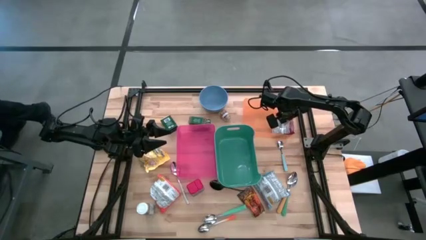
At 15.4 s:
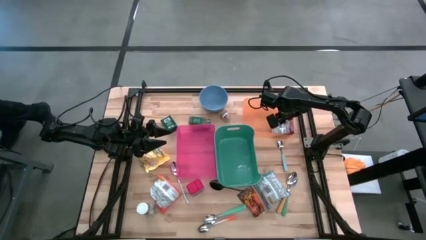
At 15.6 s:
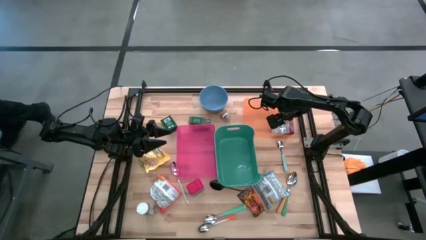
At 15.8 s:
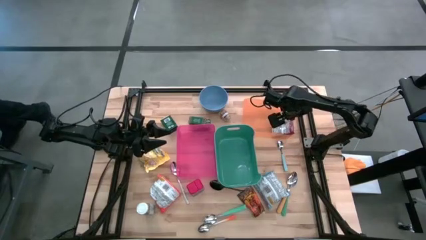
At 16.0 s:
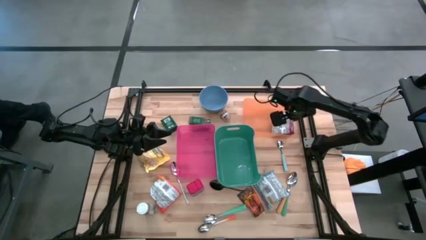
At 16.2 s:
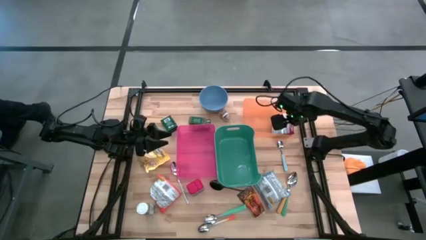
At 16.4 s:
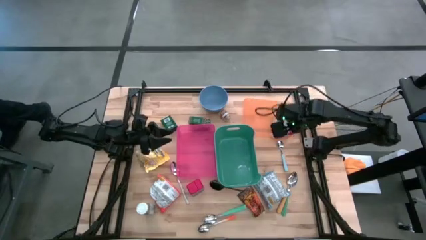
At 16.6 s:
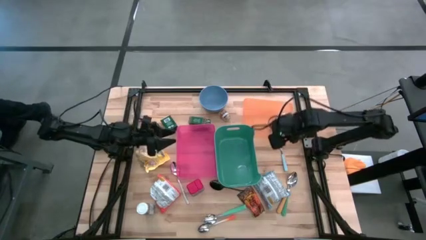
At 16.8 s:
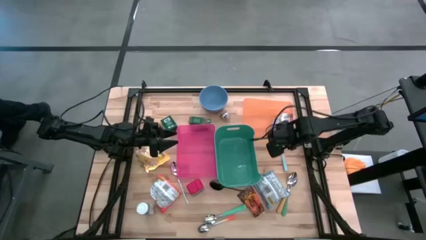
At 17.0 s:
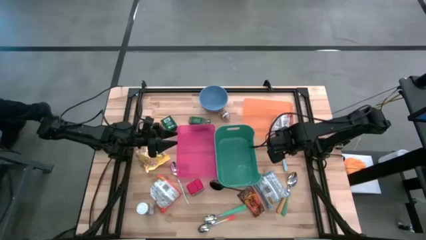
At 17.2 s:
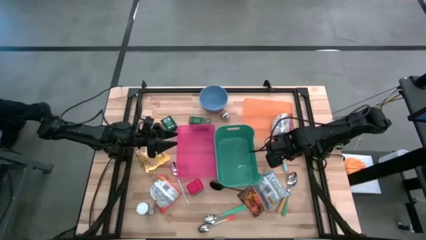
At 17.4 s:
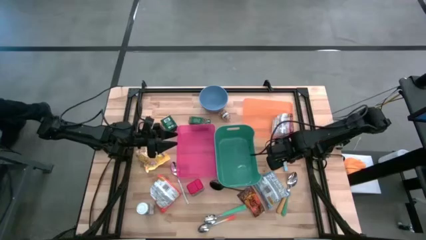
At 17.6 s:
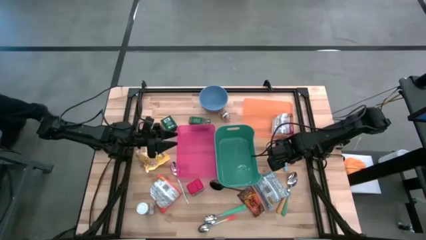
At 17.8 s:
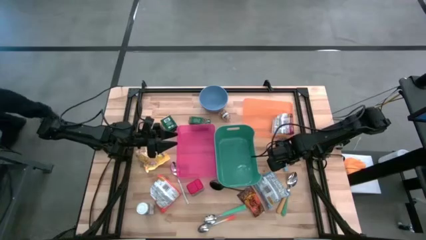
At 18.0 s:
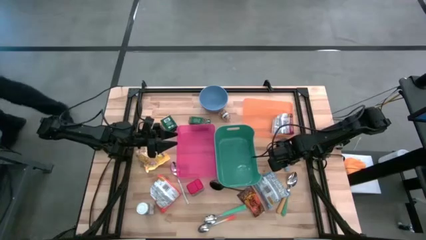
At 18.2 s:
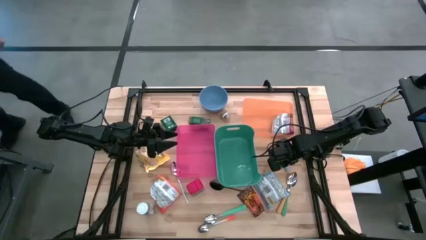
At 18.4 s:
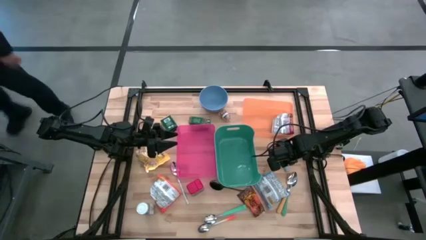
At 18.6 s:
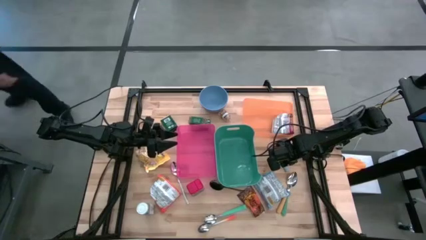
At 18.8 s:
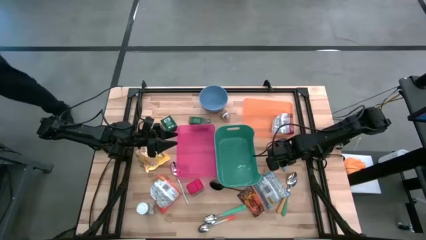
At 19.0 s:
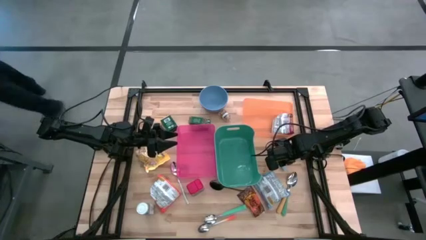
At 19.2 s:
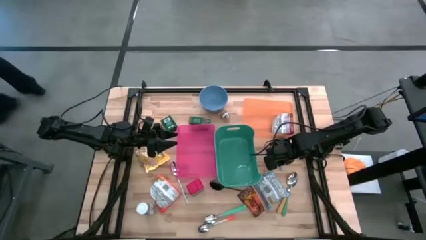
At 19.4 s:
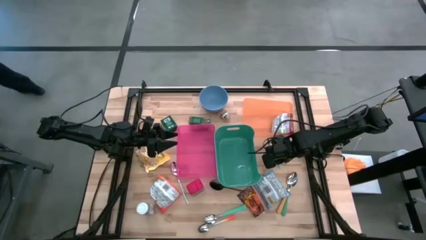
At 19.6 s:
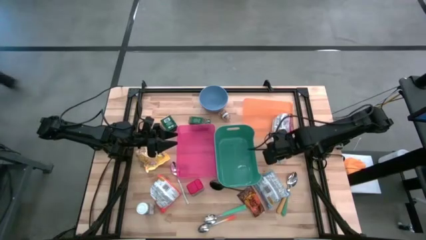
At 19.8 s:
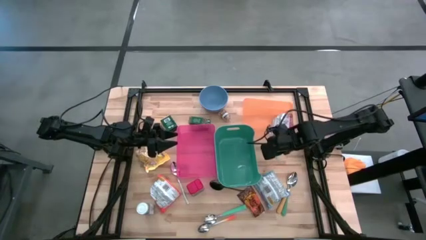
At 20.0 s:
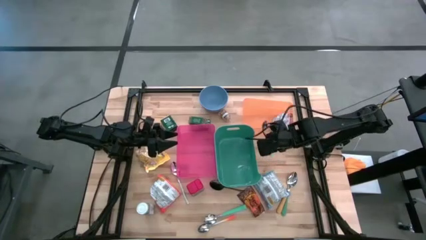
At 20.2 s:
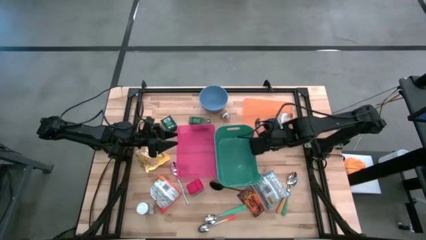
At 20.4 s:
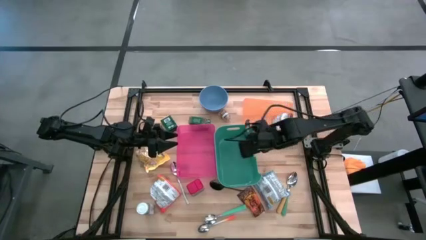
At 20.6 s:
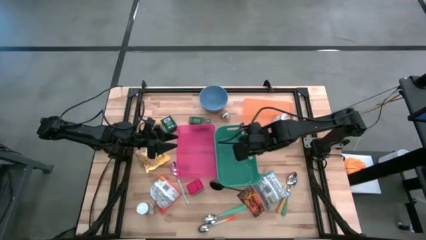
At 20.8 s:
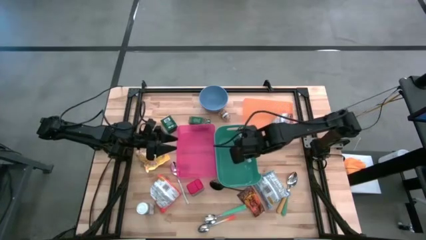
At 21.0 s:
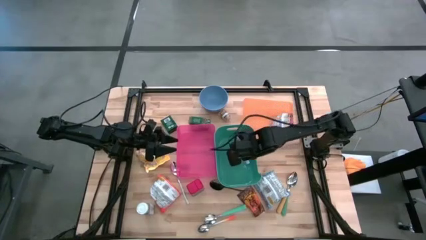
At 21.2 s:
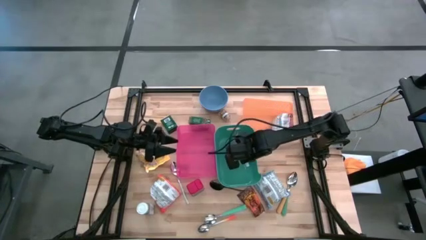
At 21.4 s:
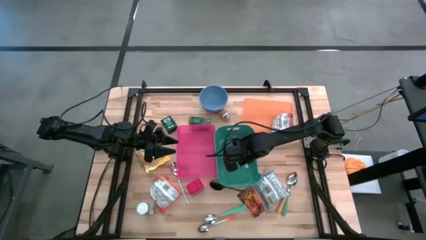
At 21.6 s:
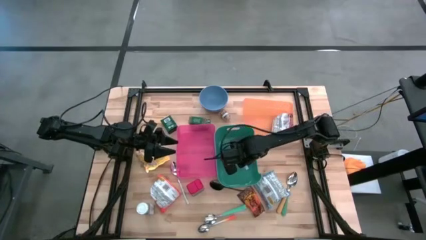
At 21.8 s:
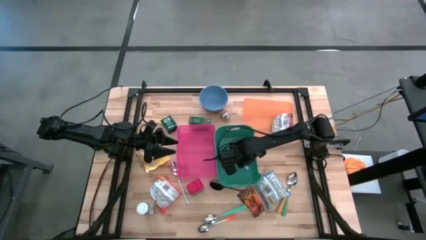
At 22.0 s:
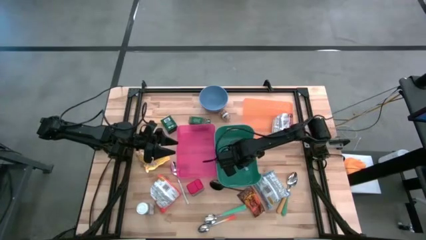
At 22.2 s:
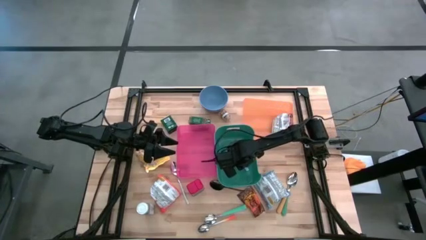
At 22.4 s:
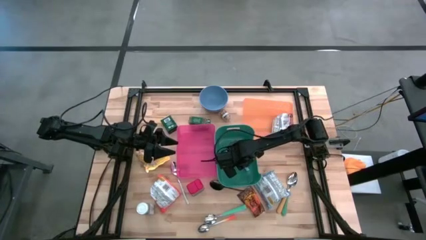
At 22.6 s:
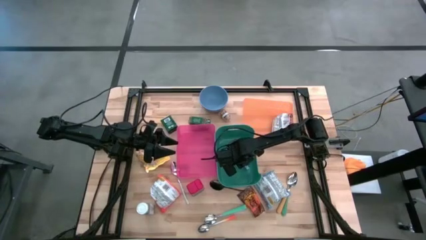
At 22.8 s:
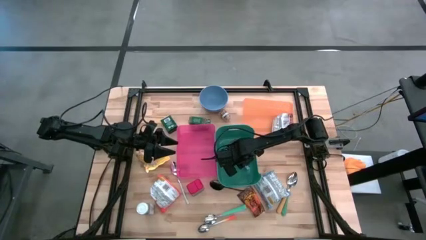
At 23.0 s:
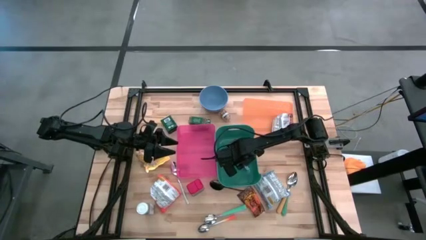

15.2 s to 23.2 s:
Put the blue spoon into the green bin

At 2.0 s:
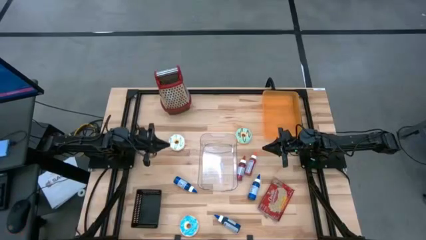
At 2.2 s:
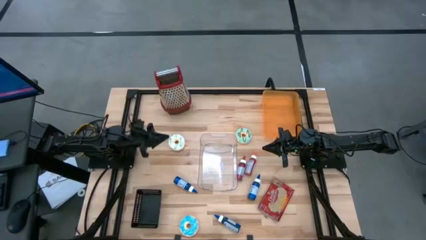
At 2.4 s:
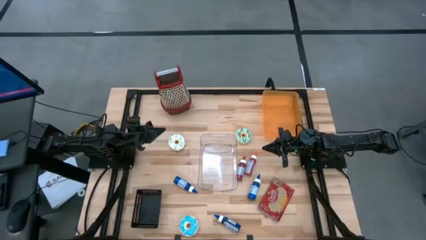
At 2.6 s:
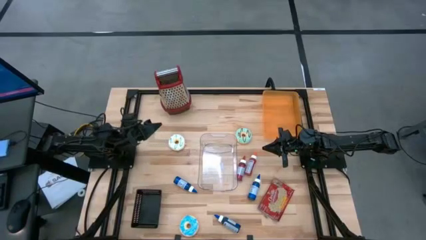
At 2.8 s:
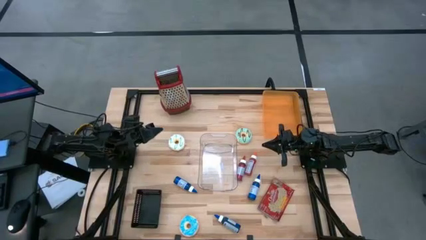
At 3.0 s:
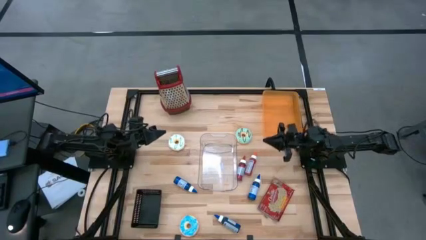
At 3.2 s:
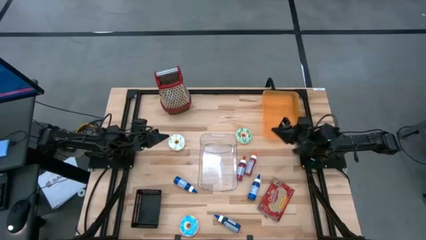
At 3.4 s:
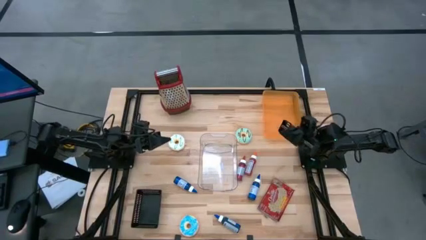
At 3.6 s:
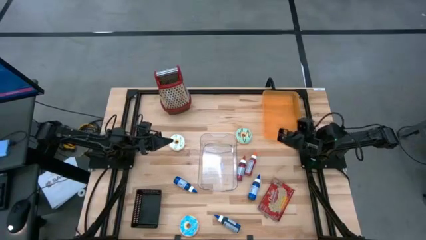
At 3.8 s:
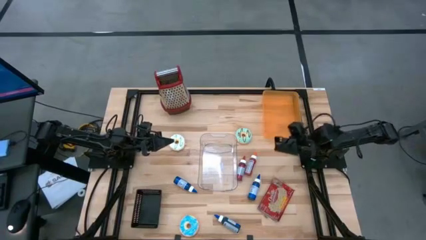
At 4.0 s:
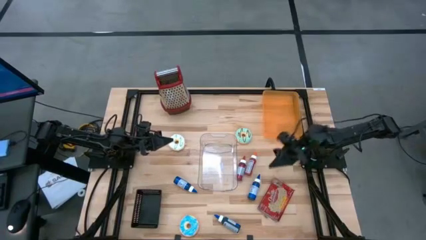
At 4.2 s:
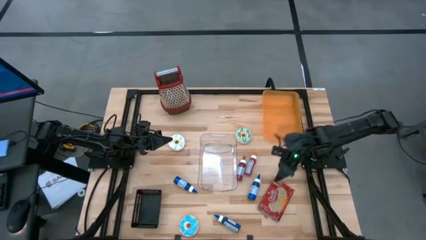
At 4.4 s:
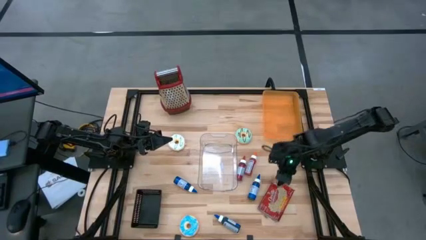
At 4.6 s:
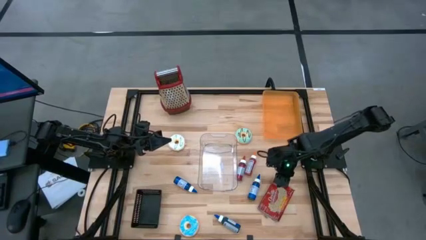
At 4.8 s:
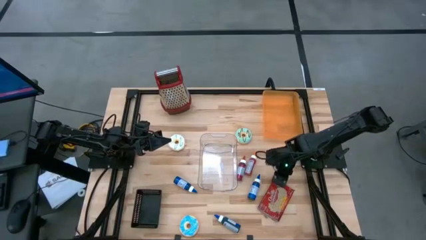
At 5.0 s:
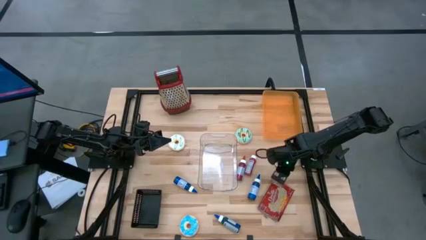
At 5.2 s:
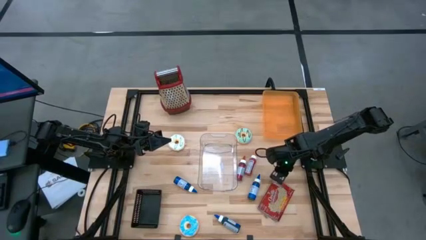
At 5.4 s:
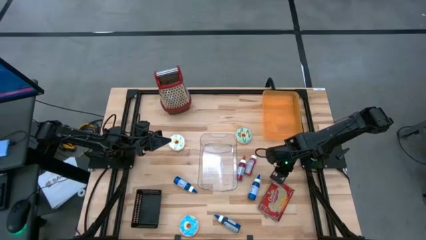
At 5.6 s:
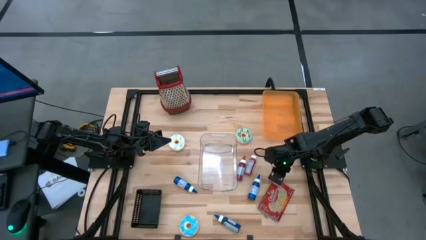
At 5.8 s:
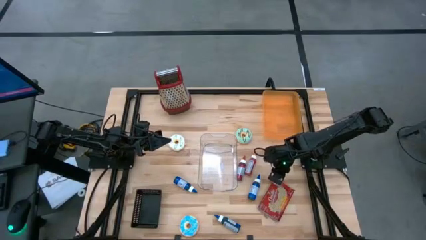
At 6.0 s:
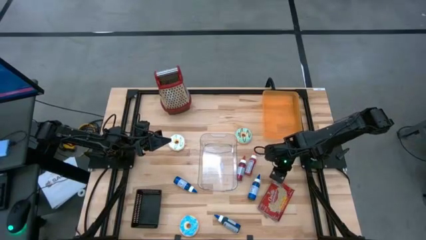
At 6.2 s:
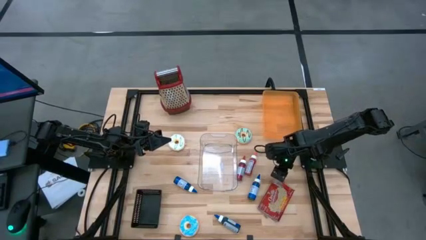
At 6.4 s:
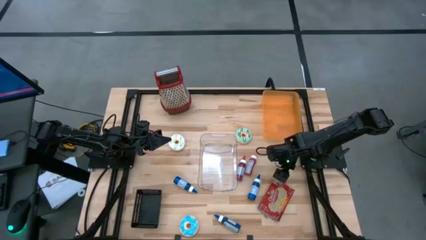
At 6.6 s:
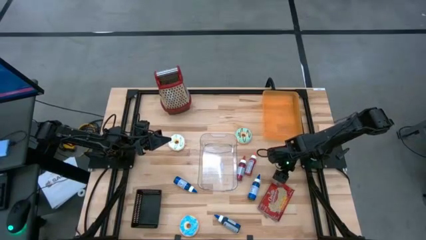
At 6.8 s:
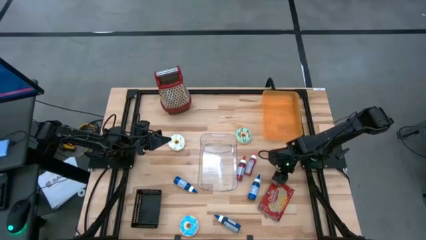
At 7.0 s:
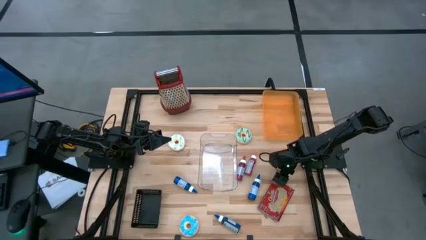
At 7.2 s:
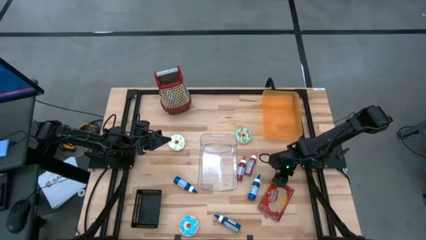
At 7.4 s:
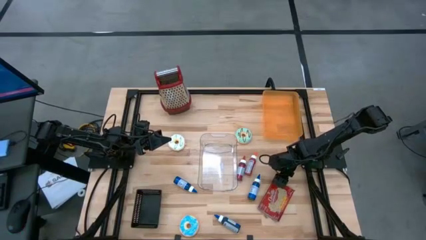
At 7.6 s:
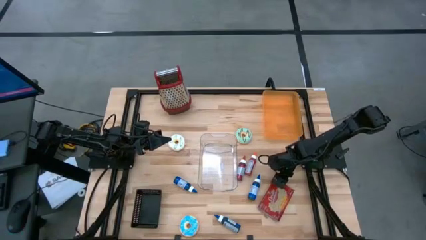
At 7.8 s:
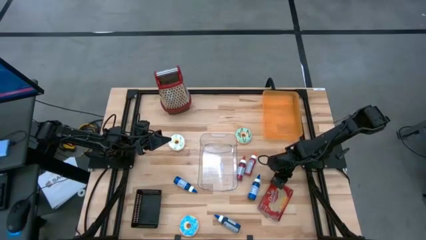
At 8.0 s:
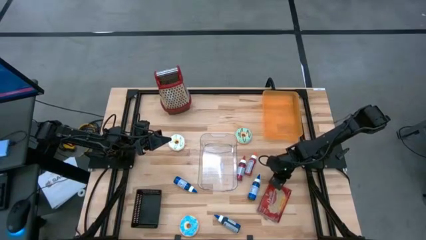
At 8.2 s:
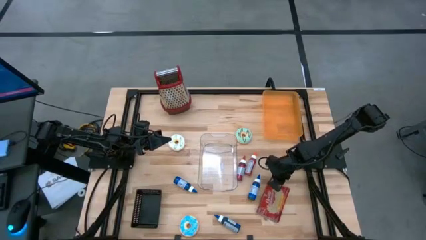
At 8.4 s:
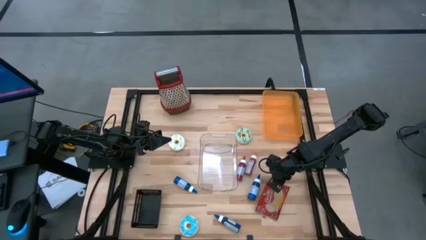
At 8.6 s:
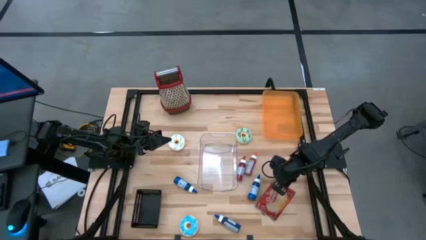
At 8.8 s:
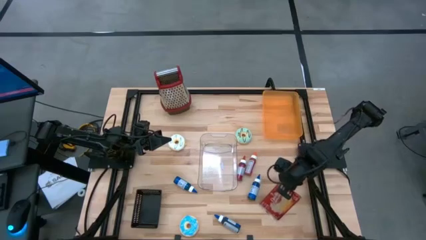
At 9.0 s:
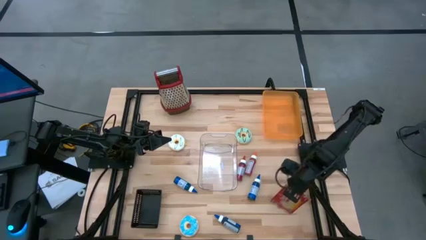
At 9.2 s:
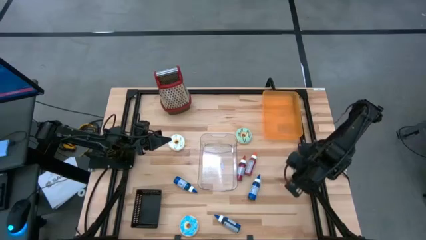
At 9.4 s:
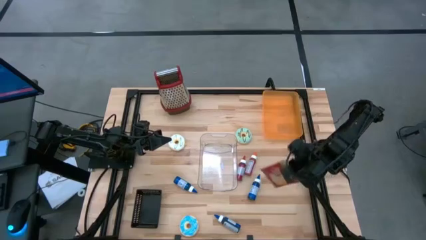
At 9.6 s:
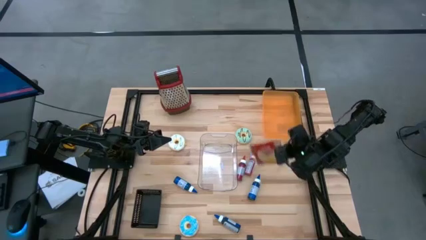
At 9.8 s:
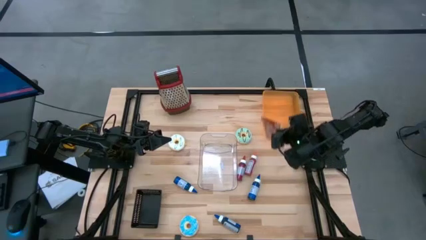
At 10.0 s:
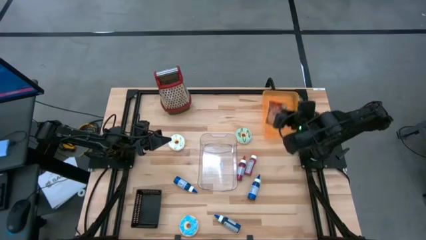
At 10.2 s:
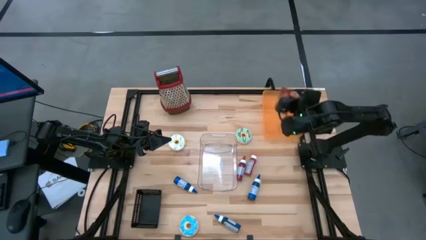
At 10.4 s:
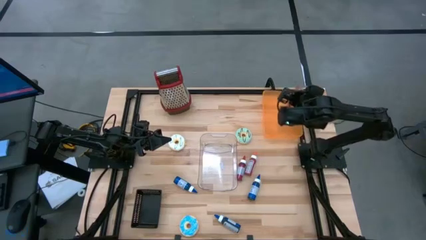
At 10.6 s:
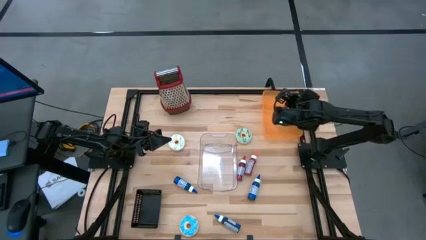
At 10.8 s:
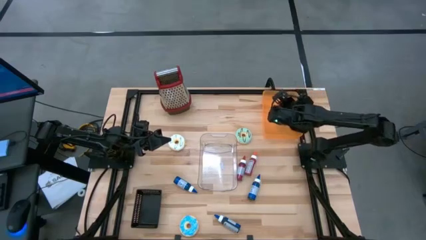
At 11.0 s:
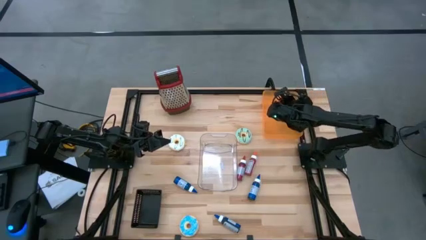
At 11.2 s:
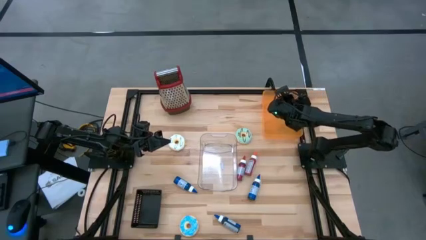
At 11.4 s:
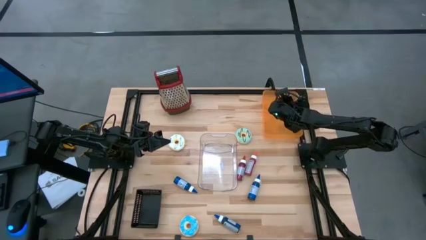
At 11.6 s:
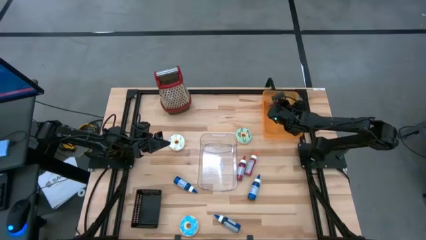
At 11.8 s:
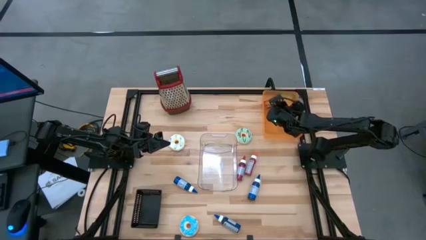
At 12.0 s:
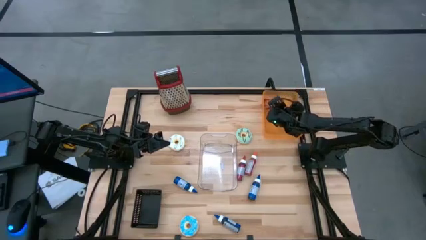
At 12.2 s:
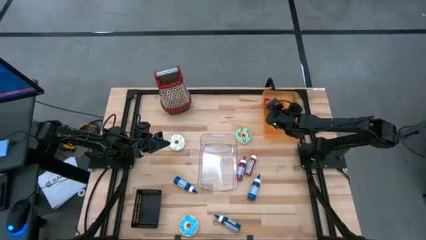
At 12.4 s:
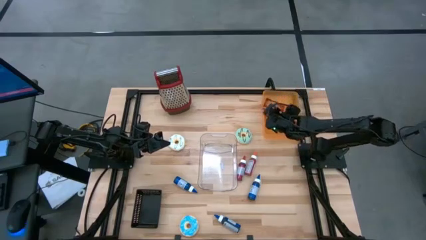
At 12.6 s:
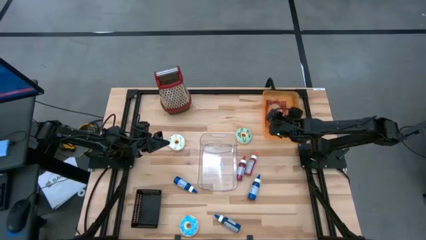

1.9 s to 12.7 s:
Put the red popcorn bag into the orange bin
